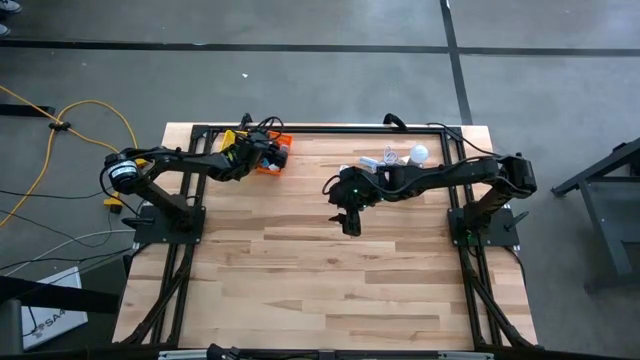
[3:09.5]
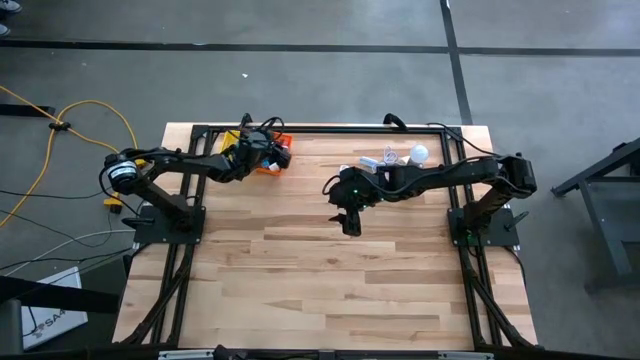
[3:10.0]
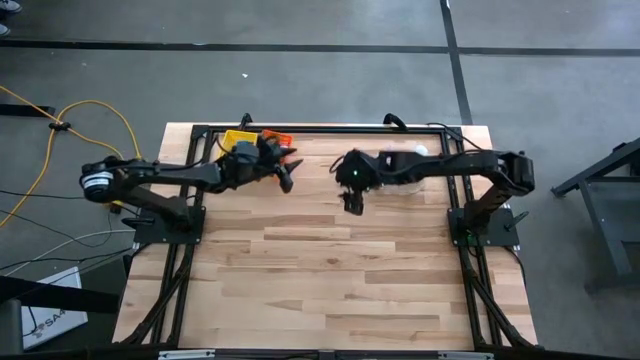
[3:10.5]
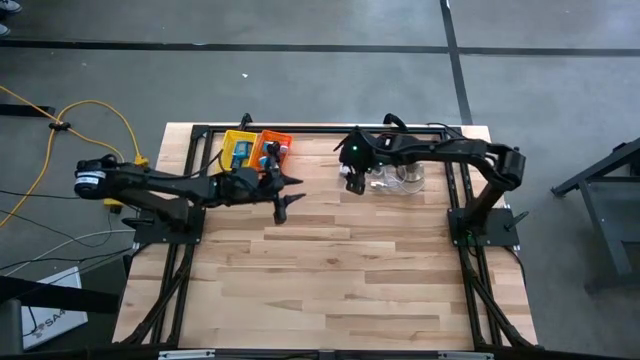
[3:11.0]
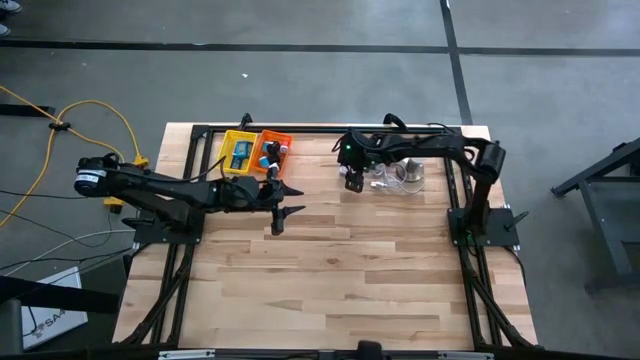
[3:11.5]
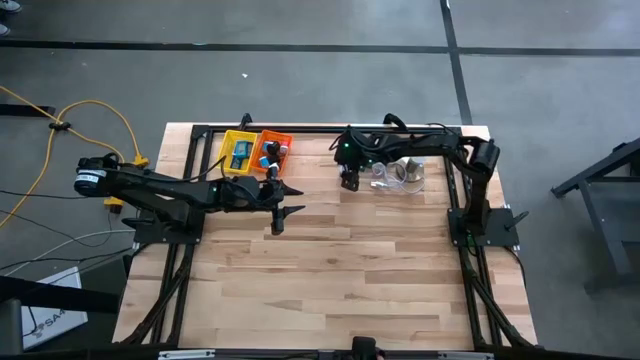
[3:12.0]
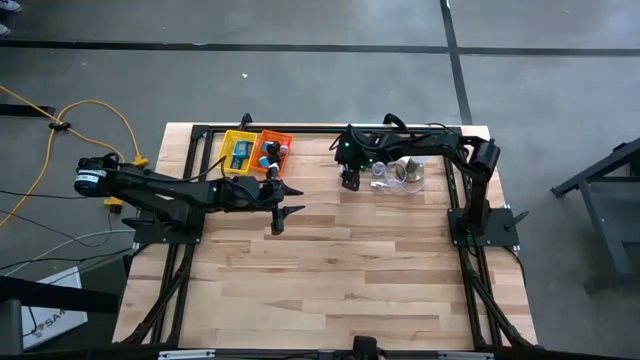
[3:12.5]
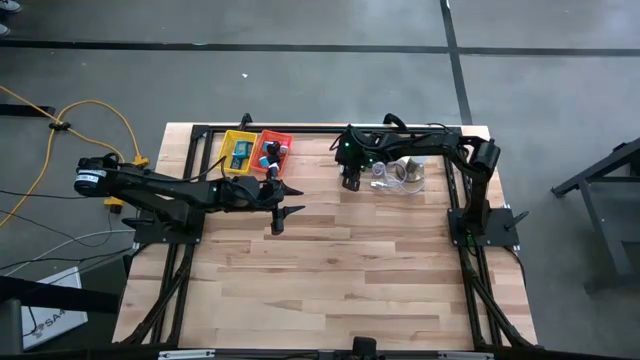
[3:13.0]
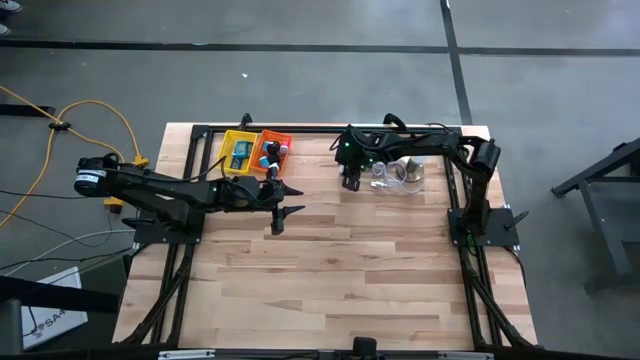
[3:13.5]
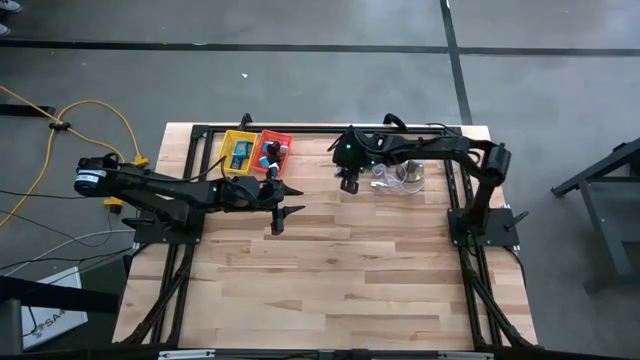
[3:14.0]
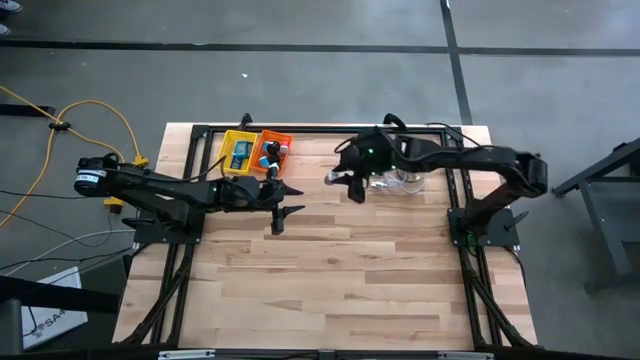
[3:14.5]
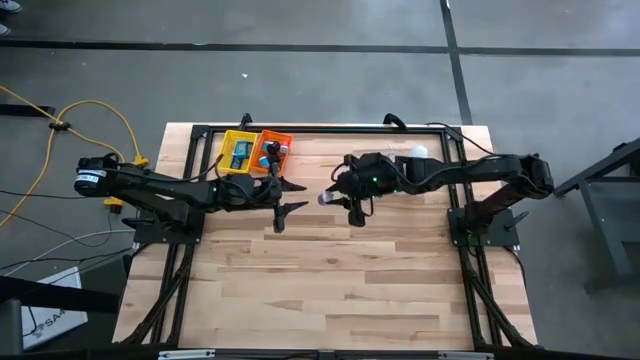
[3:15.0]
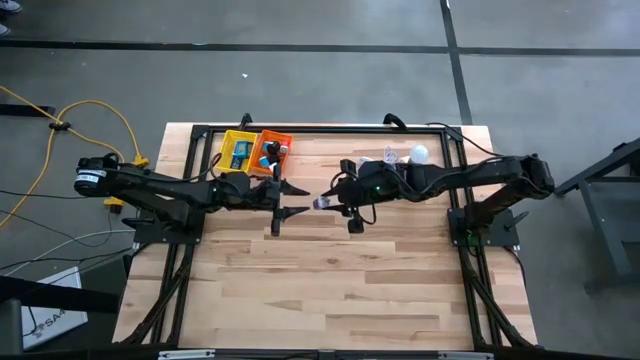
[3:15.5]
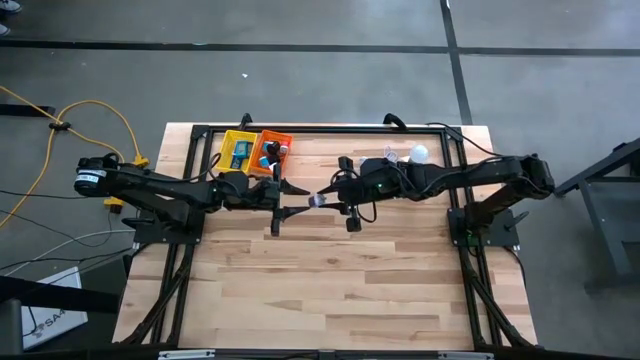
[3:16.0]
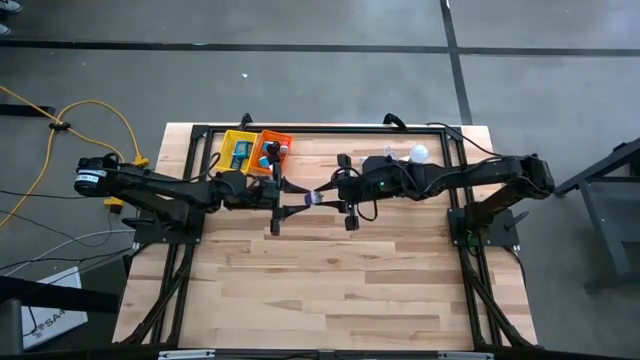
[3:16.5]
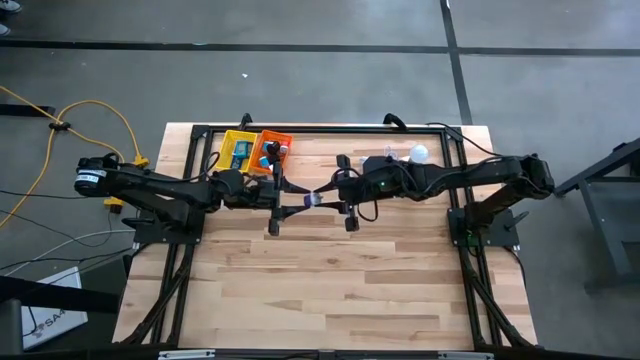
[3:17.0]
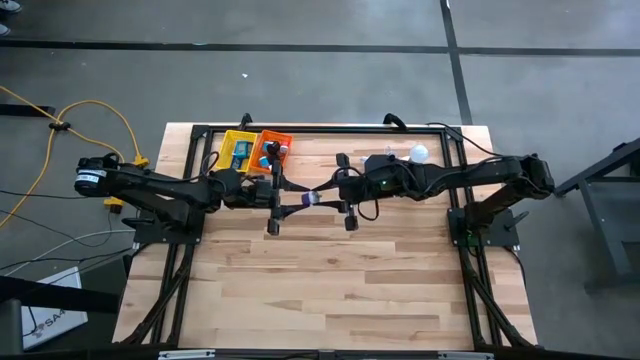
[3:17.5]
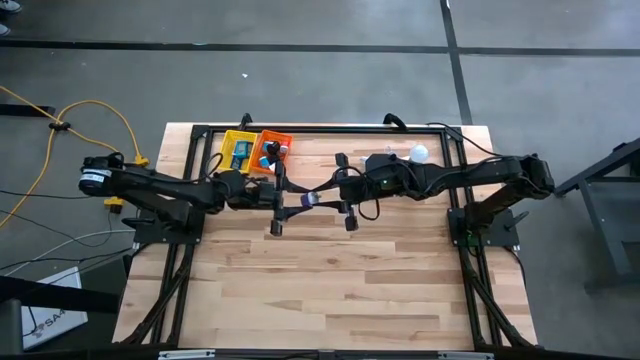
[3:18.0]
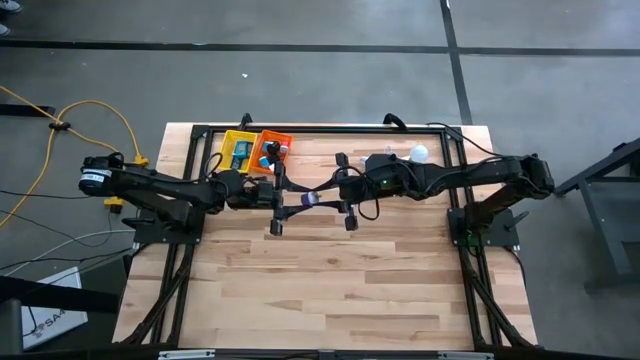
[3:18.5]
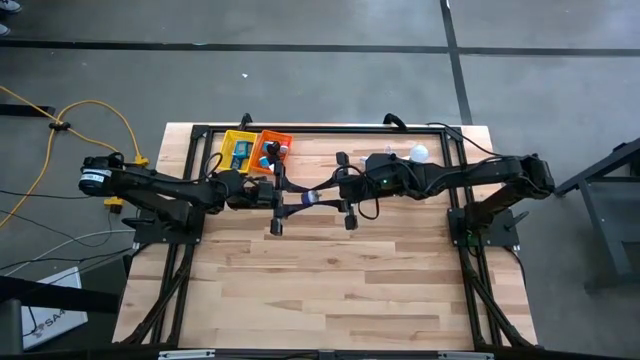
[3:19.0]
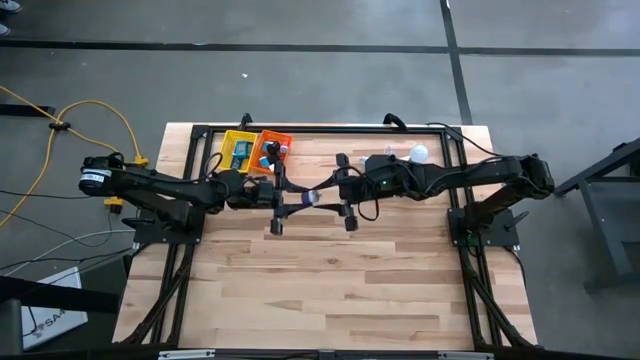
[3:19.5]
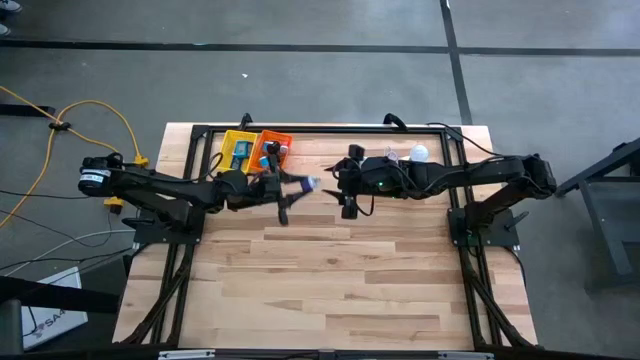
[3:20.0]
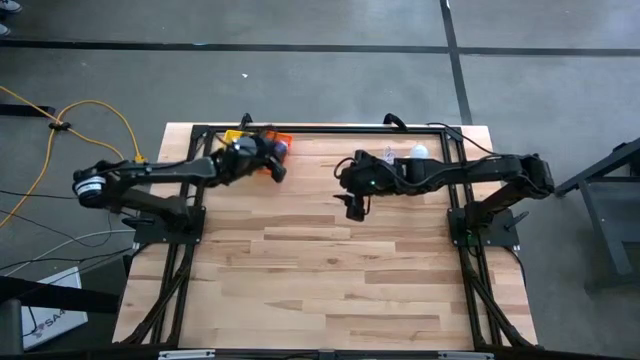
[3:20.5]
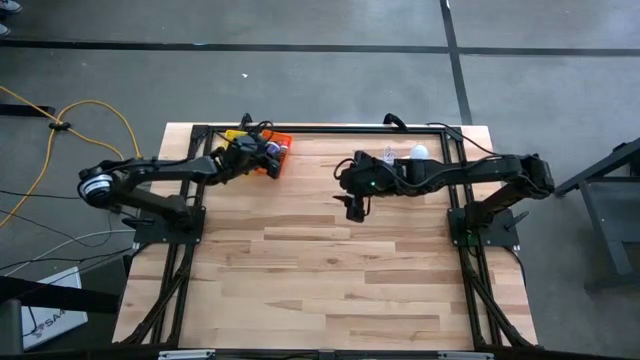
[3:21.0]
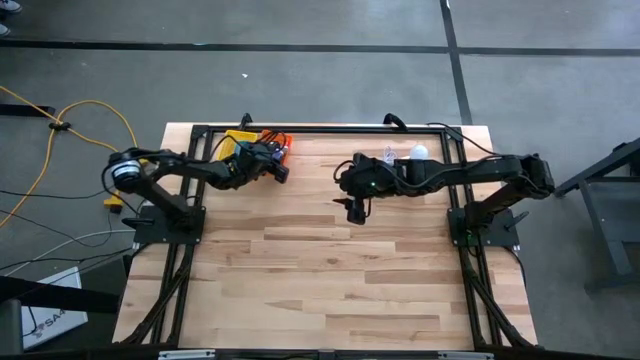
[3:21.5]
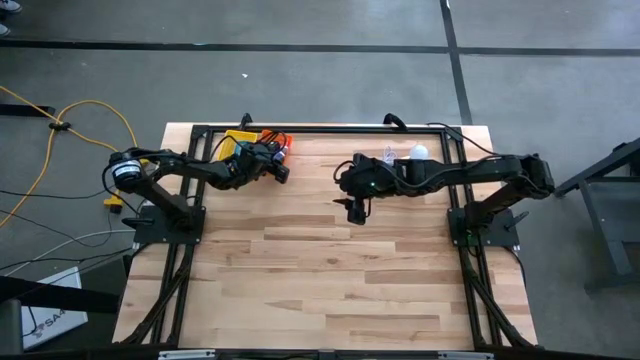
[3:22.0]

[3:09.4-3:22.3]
Task: Pick & Place Office items
Put the purple adapter into the orange basket

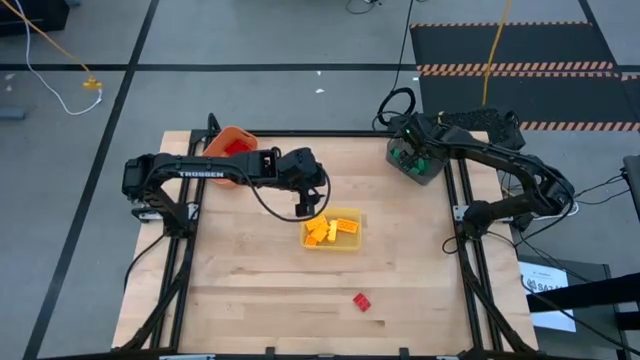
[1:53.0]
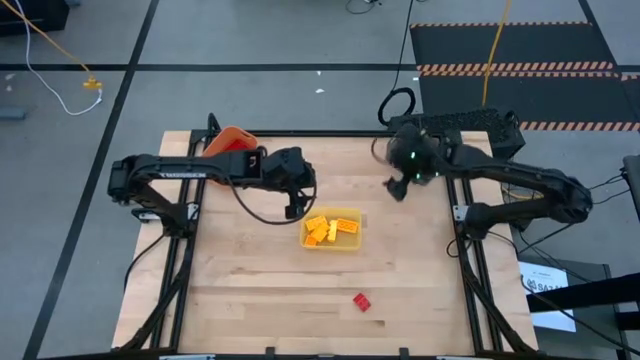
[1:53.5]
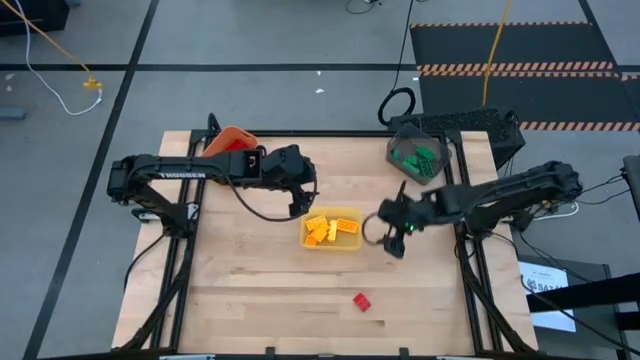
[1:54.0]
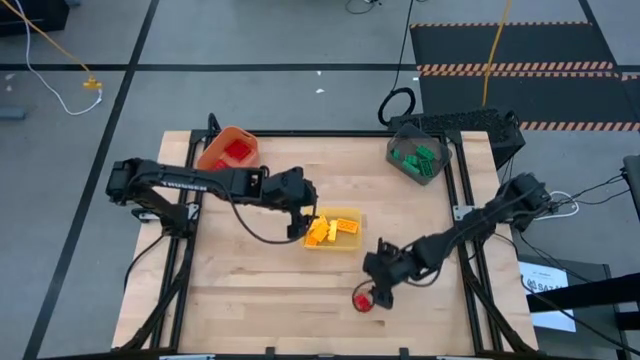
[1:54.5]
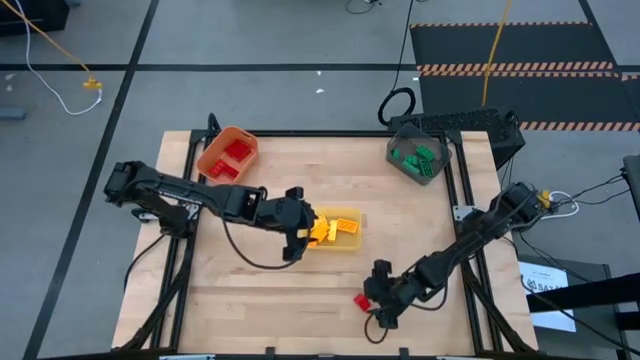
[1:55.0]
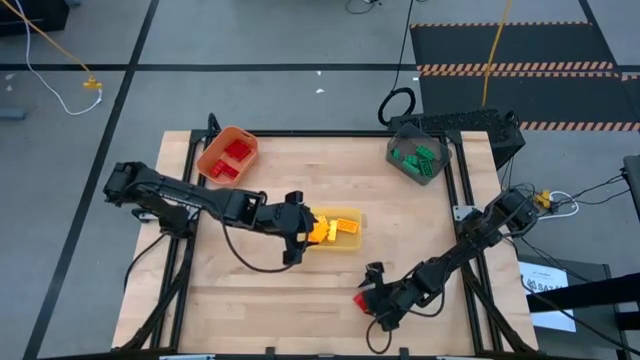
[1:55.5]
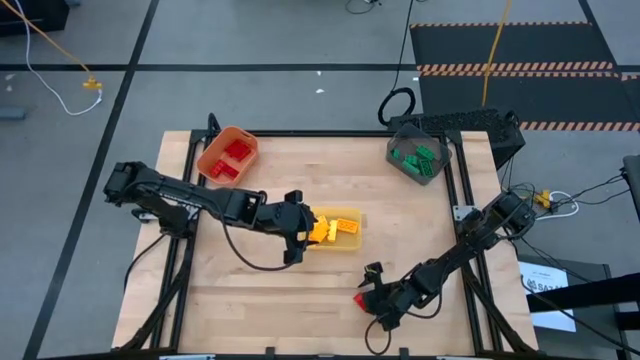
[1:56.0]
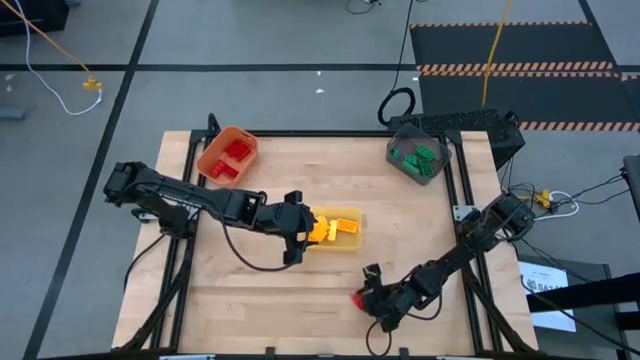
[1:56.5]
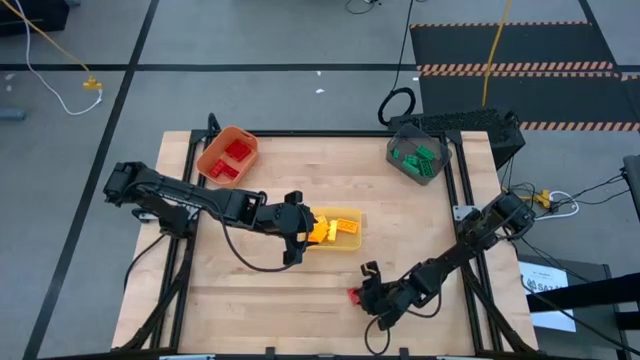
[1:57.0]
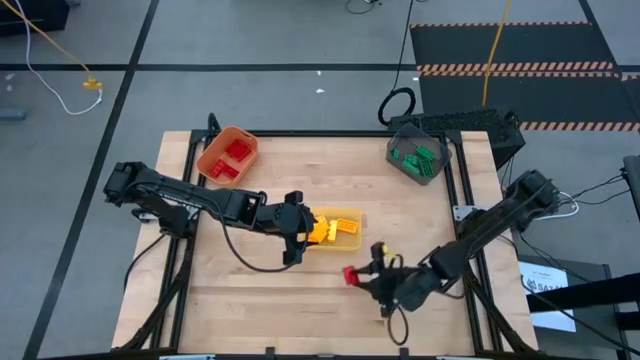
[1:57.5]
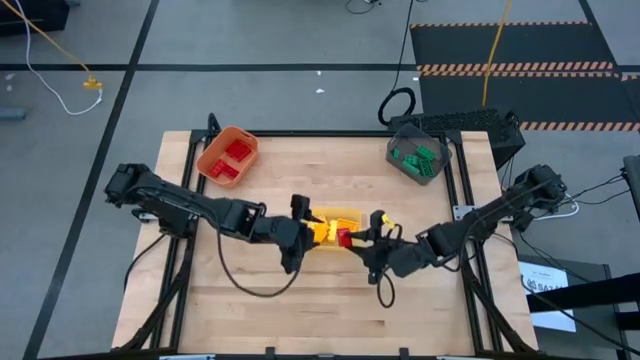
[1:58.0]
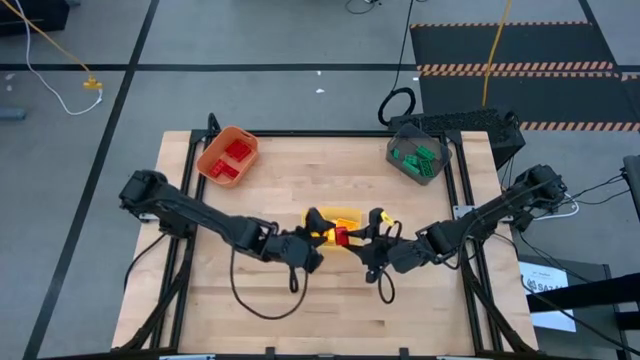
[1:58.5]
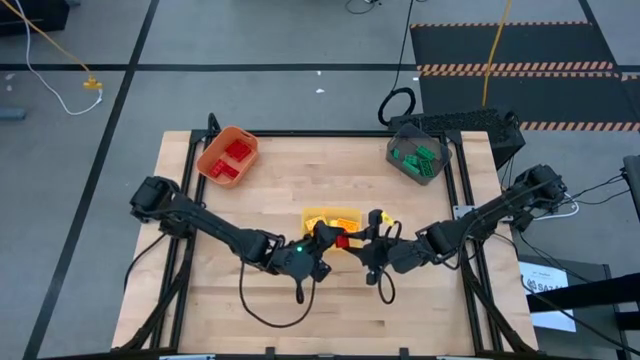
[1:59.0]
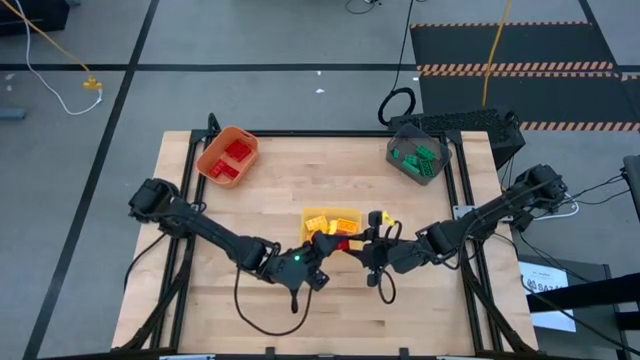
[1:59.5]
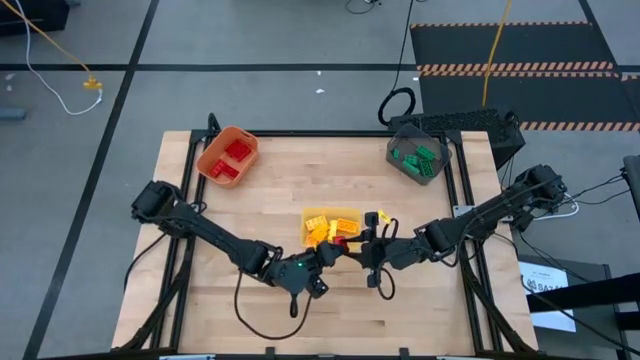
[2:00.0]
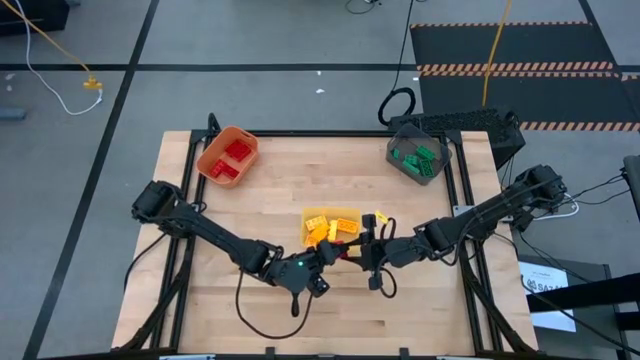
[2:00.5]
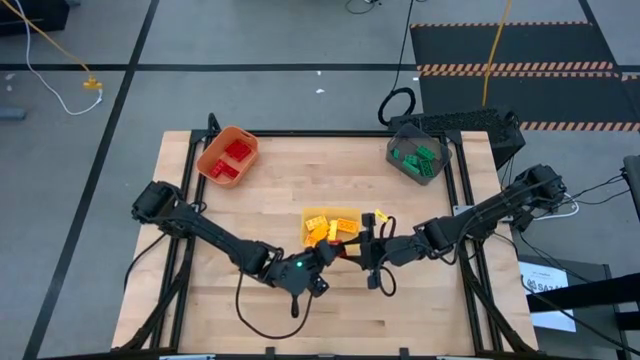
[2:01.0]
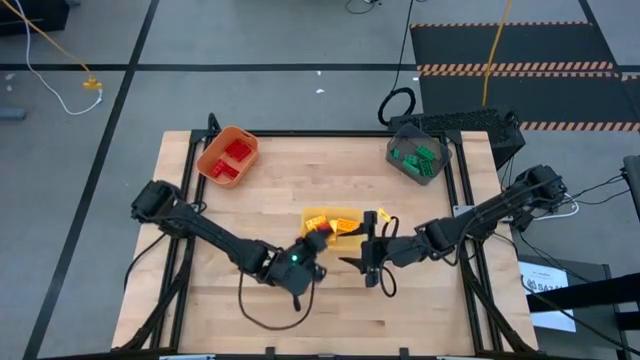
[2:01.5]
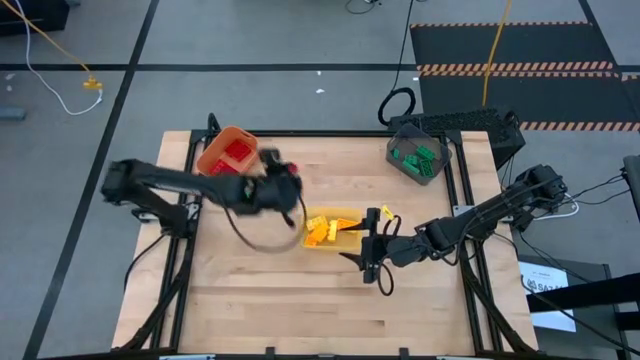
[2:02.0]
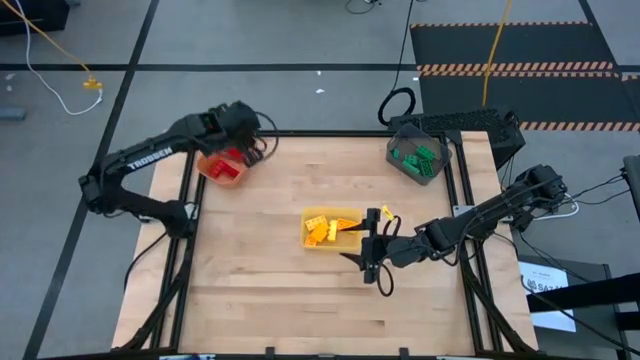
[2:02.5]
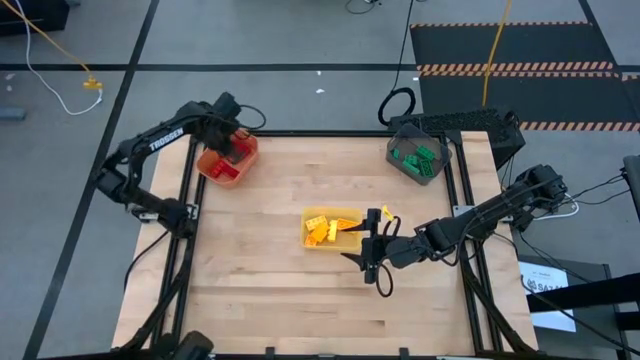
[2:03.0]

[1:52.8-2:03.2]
Task: Sort & place blocks by color
Put the red 4-stud game piece into the orange bin
